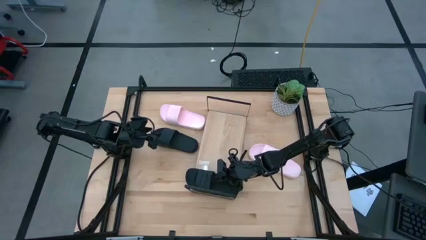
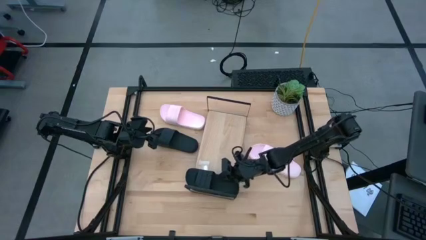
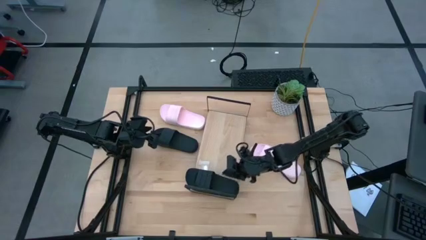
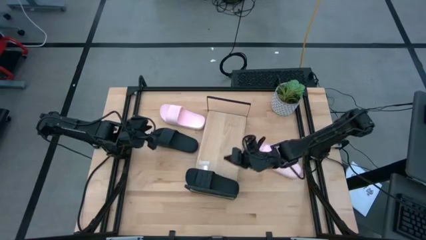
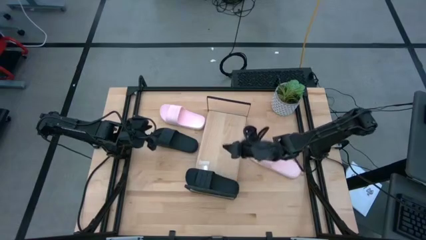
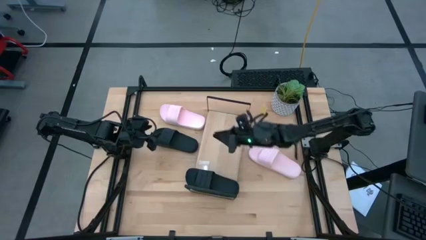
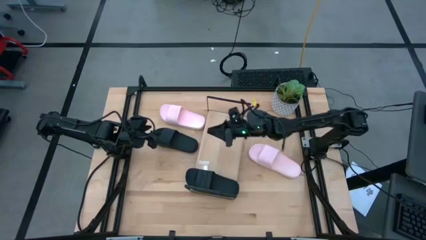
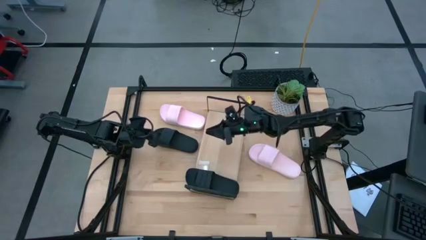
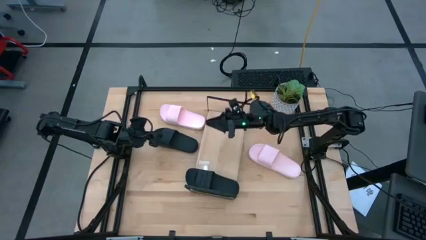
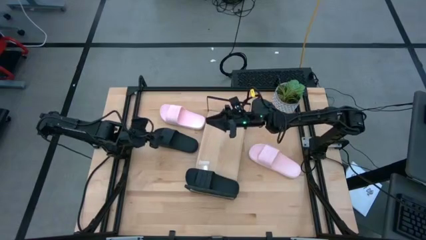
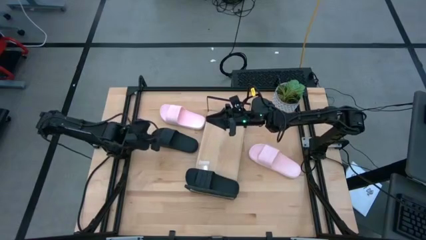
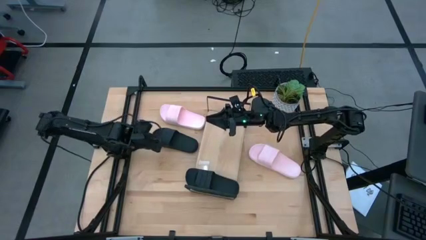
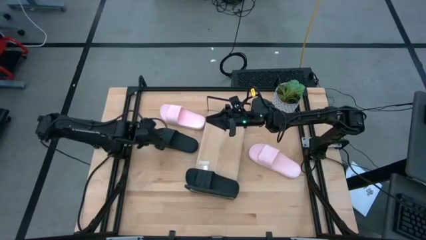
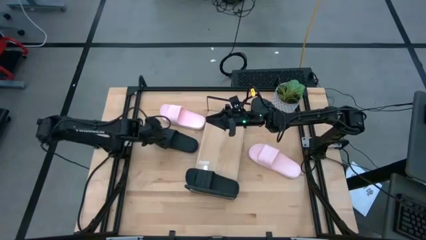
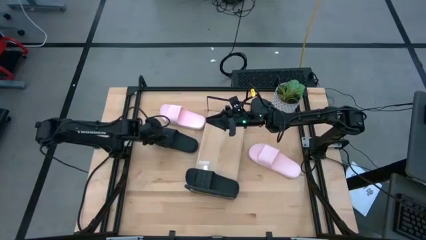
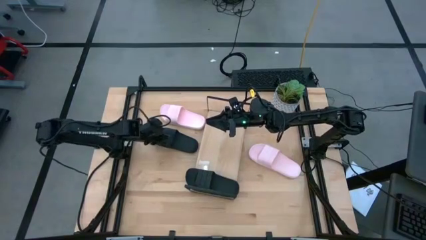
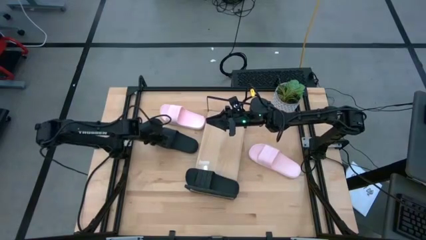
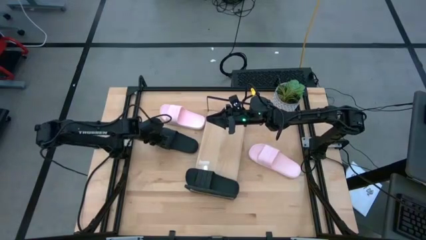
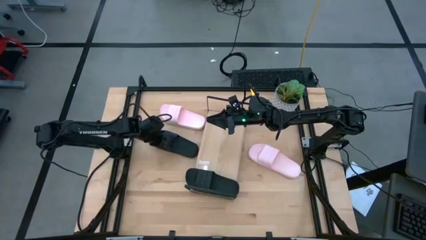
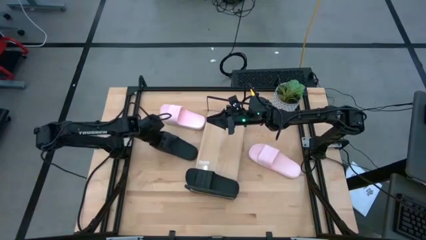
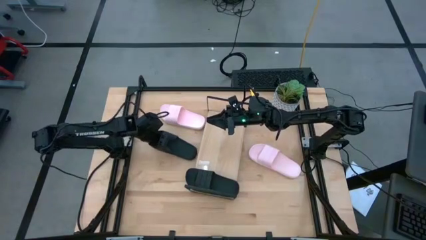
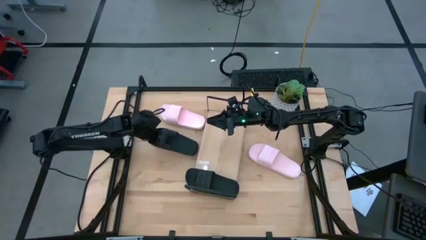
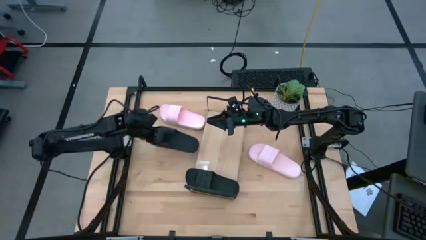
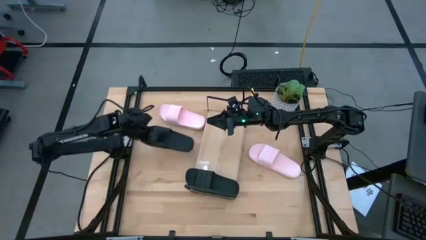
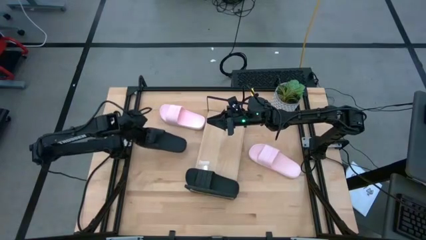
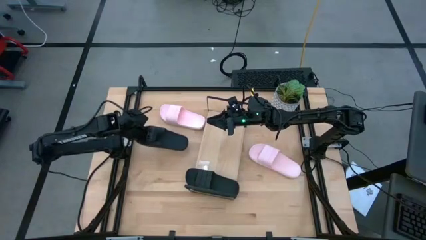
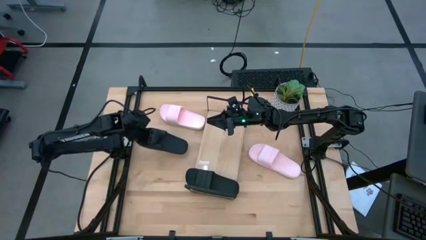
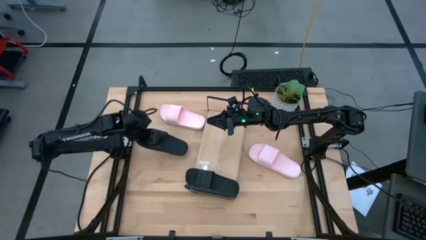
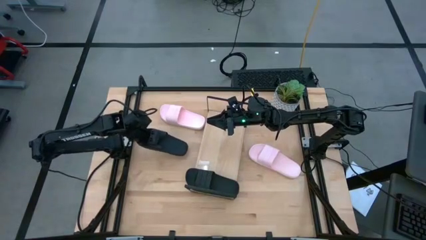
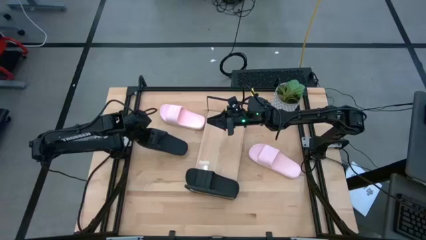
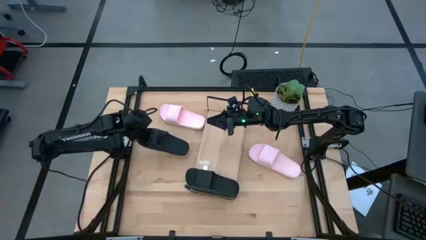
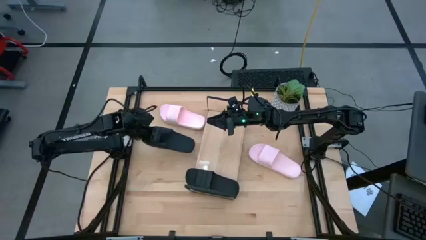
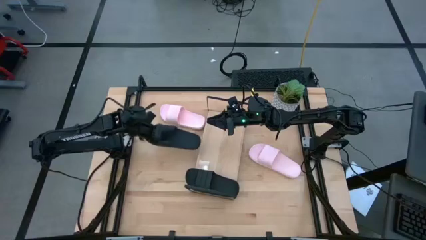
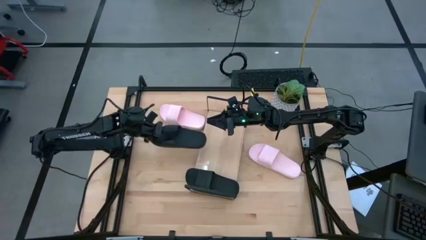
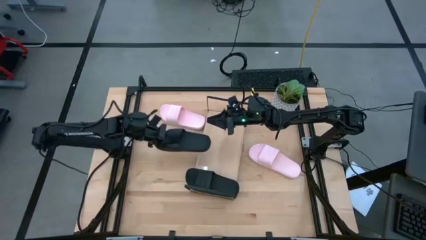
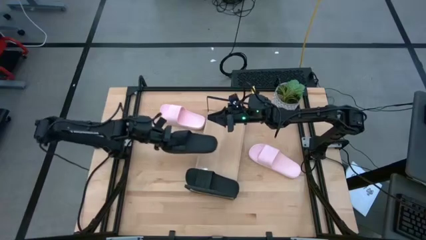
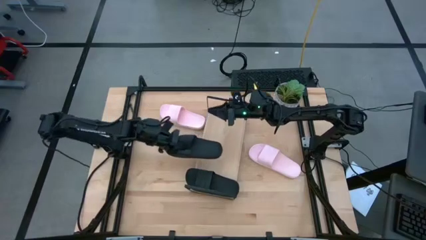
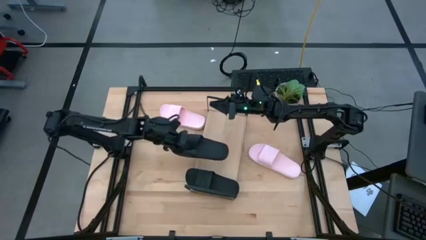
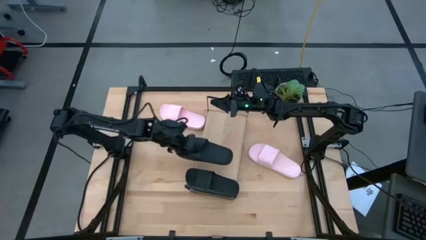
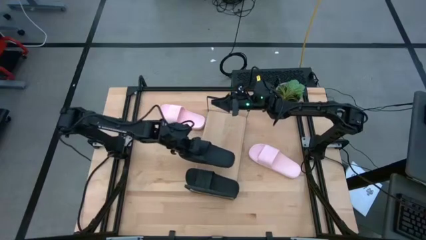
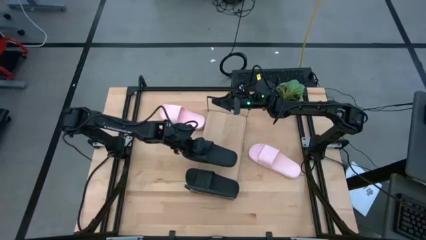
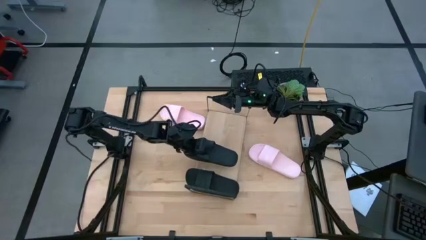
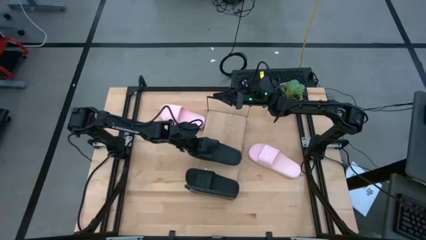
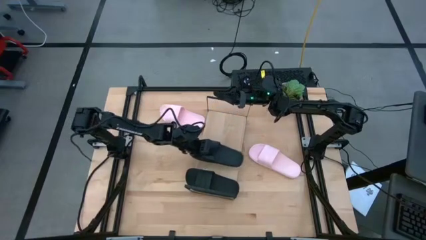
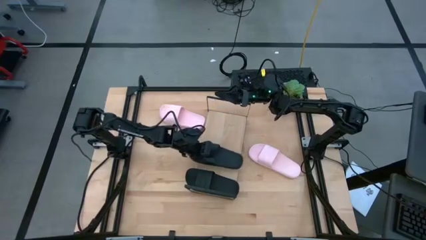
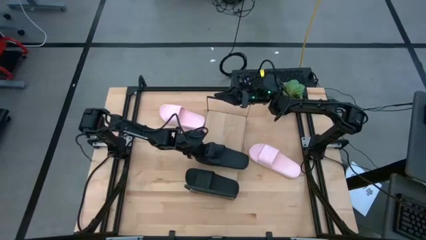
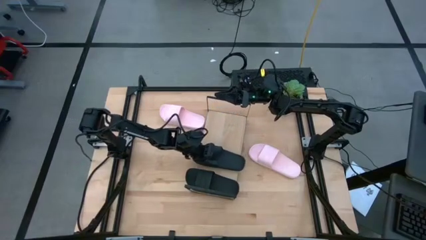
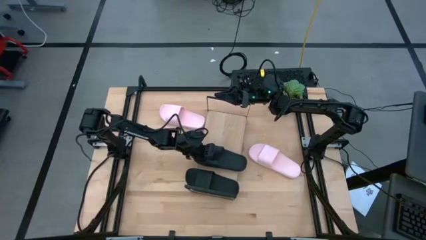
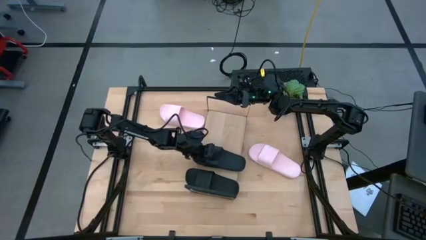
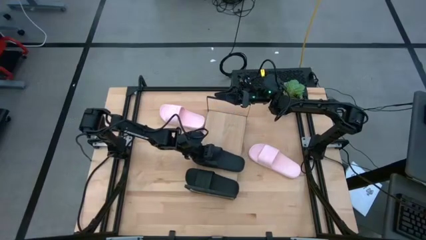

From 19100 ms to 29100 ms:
Task: Pick and place slides into the shelf
Put the black slide on the shelf

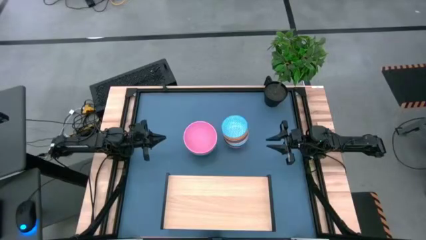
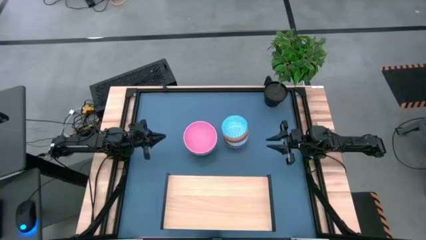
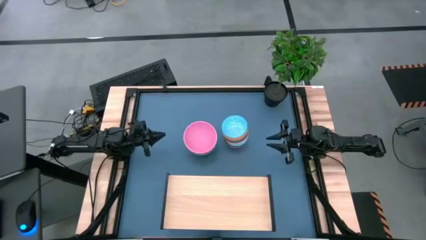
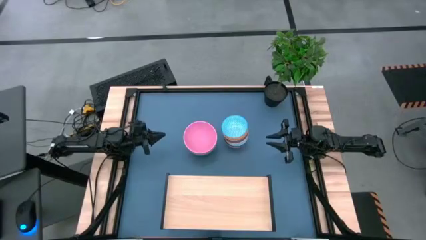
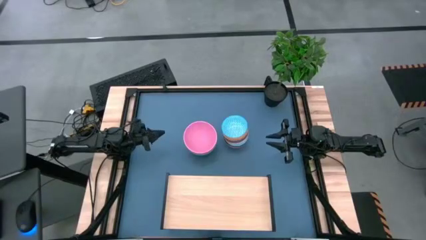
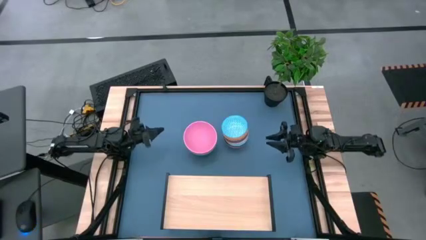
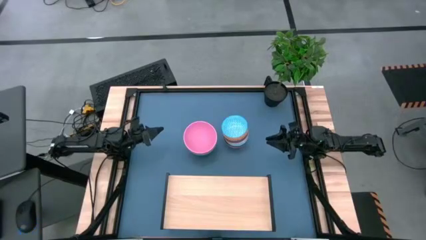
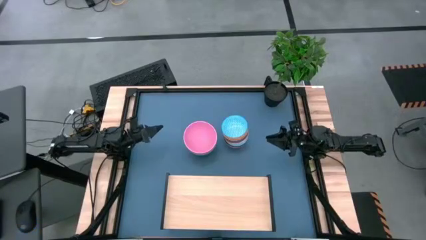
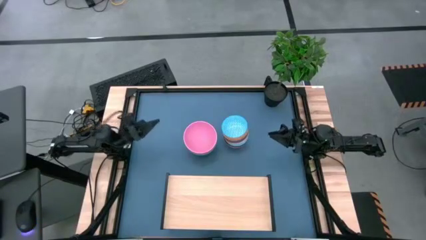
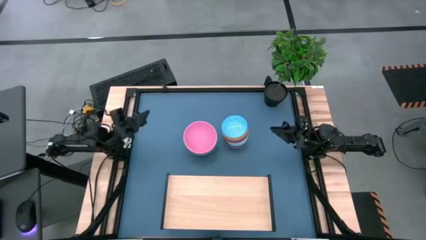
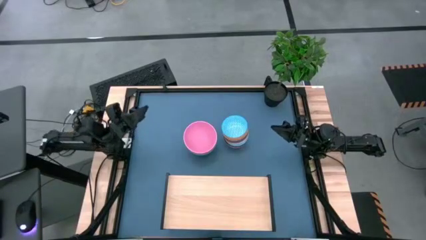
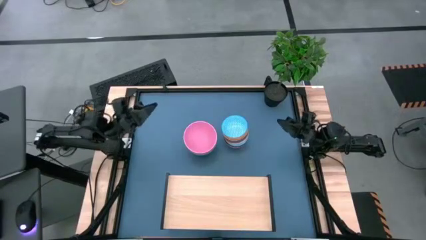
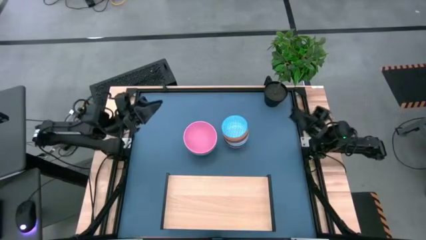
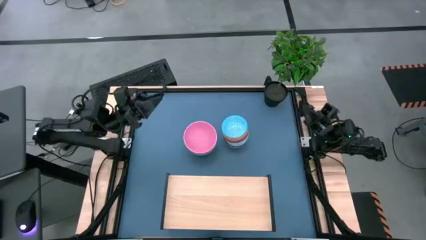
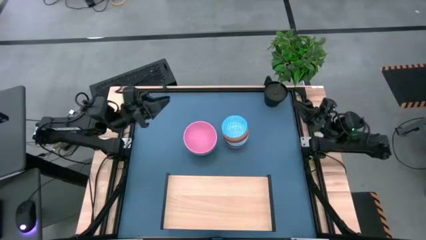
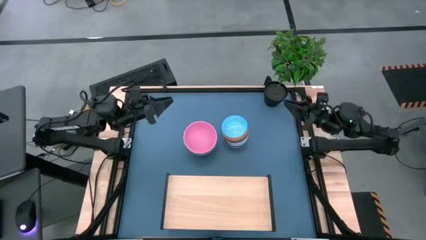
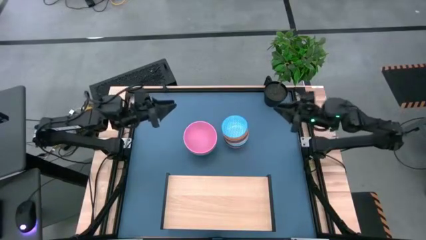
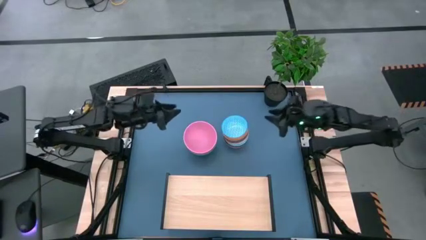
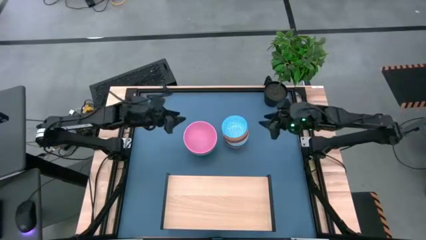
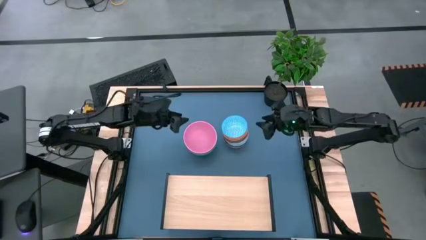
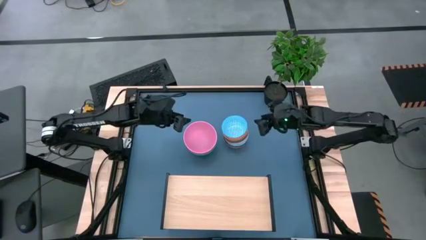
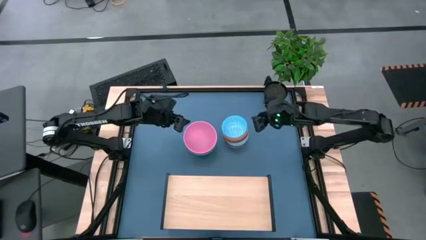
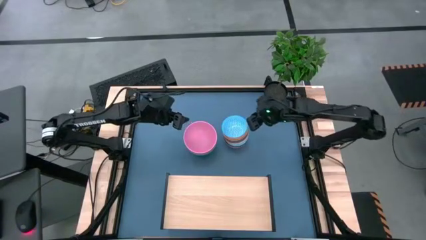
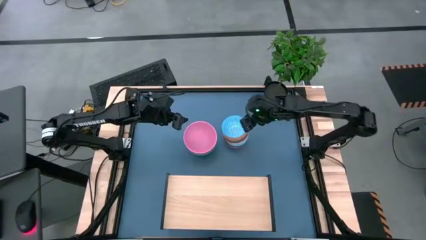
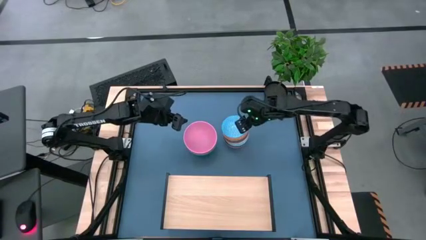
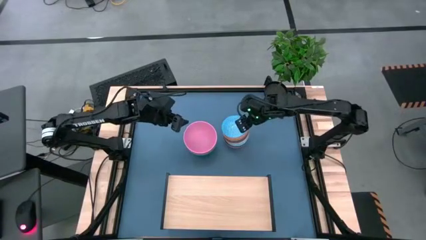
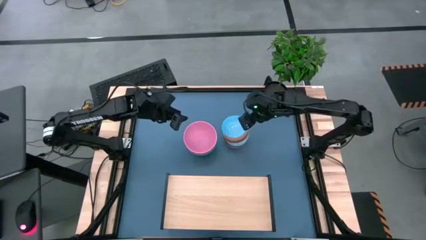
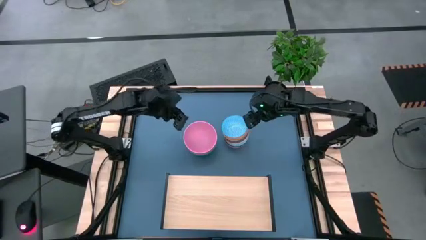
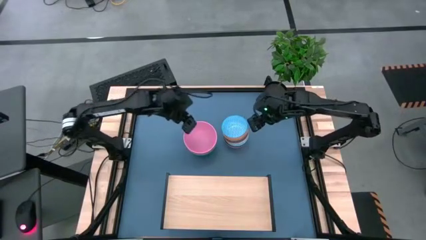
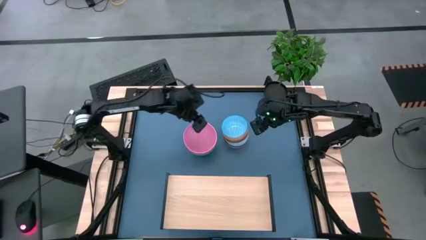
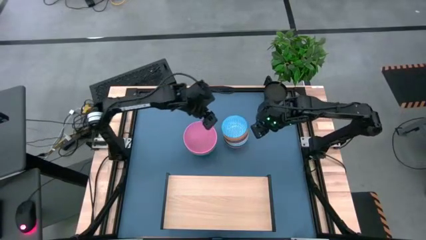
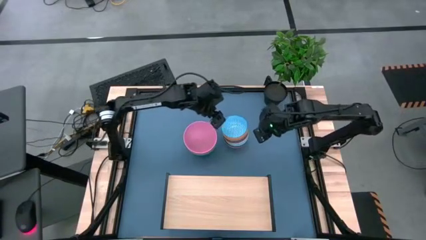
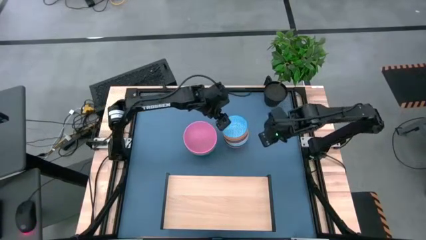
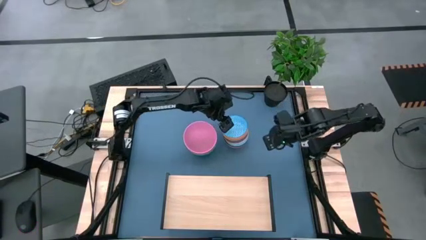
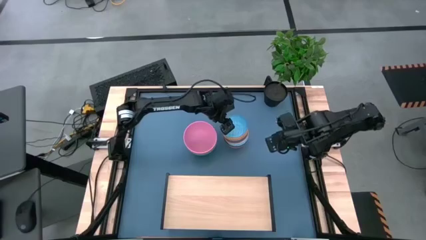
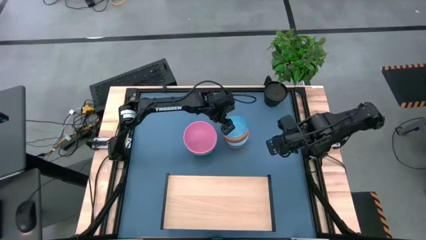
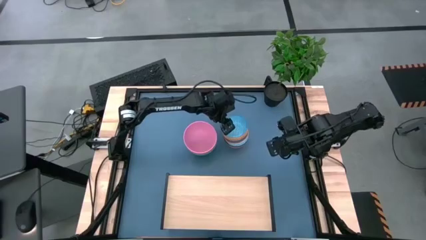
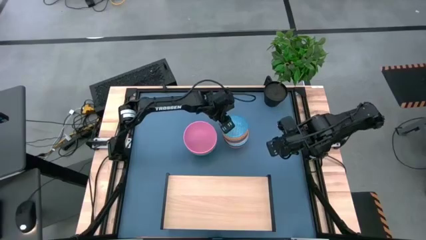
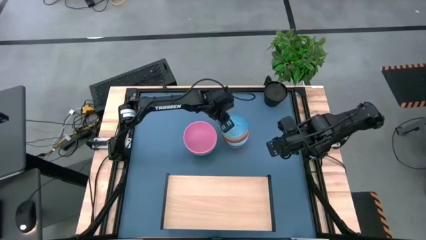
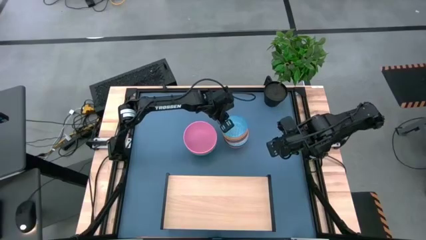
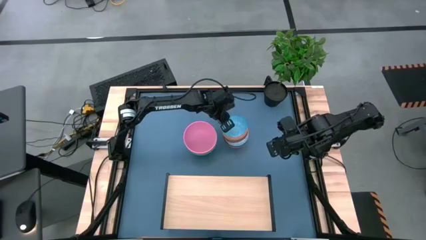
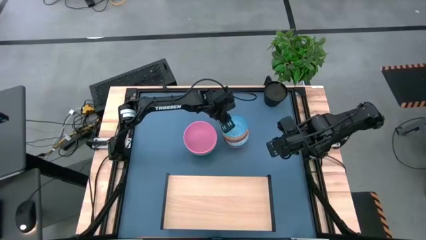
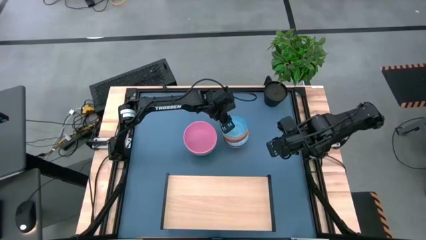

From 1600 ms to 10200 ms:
Task: Place and stack bowls onto a shelf
Put the light blue patterned bowl on the shelf
